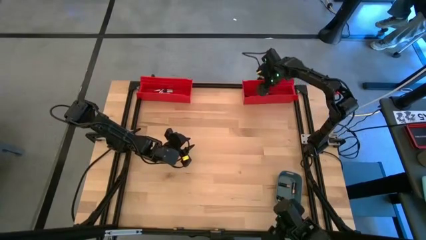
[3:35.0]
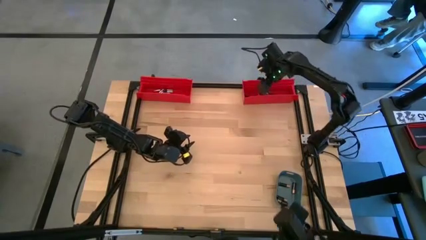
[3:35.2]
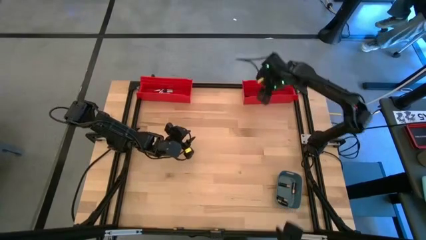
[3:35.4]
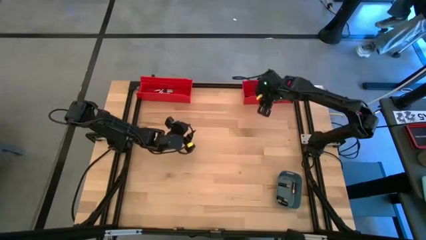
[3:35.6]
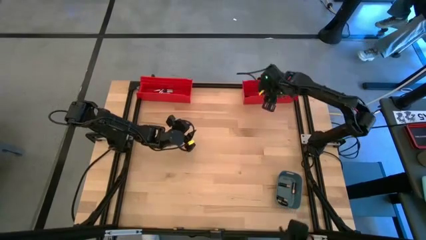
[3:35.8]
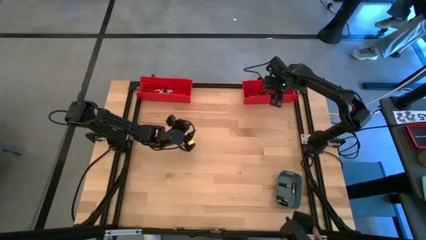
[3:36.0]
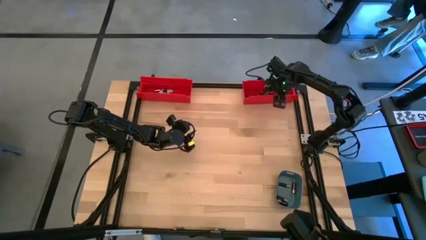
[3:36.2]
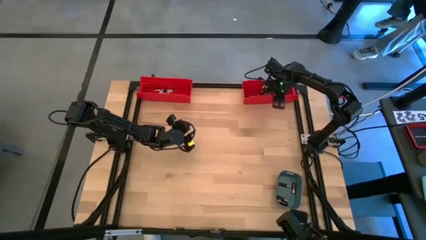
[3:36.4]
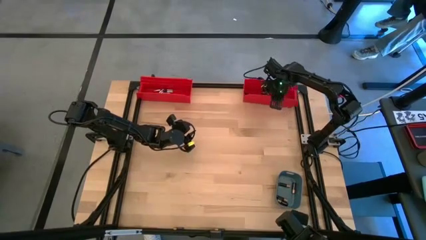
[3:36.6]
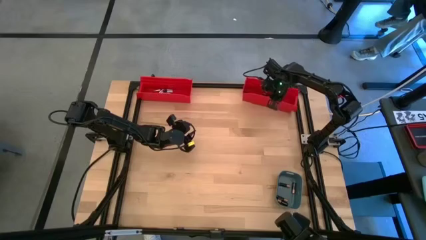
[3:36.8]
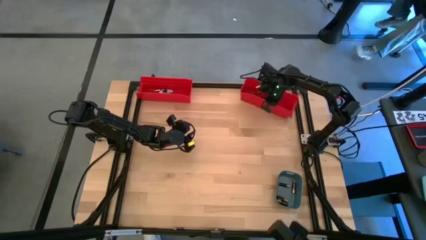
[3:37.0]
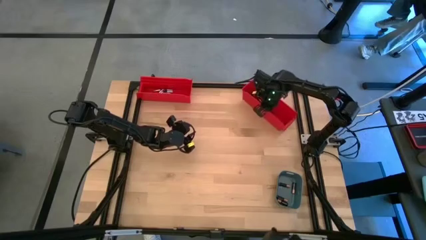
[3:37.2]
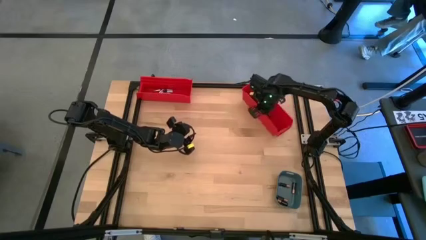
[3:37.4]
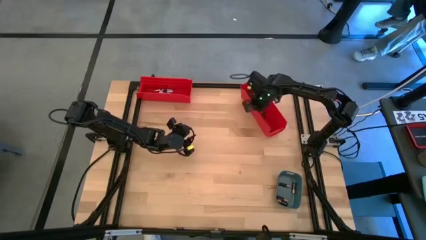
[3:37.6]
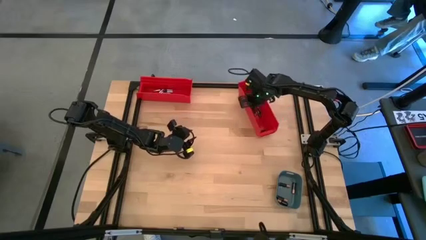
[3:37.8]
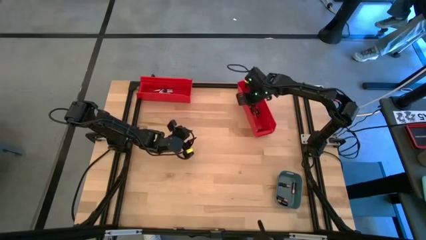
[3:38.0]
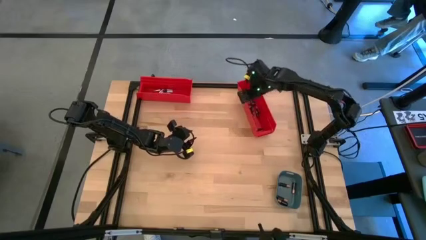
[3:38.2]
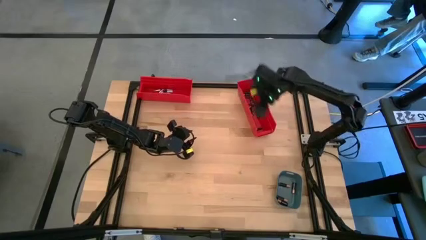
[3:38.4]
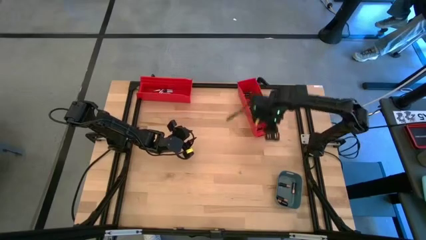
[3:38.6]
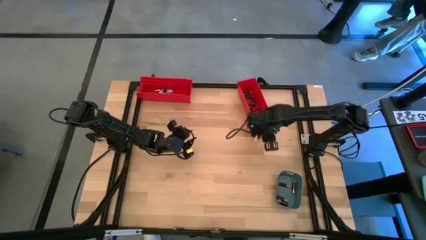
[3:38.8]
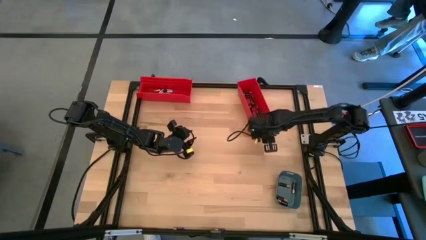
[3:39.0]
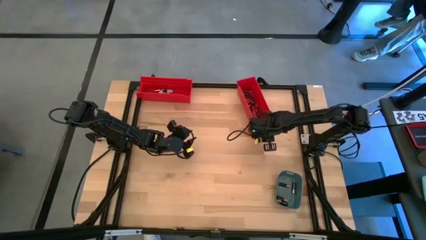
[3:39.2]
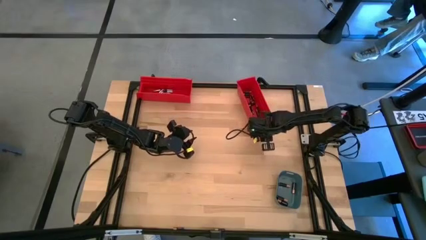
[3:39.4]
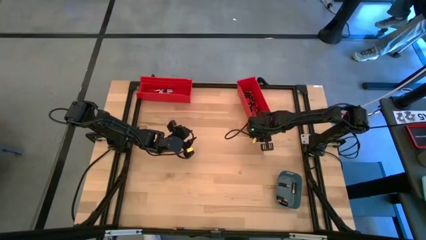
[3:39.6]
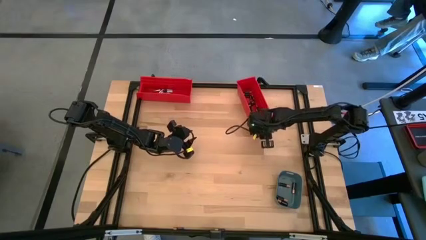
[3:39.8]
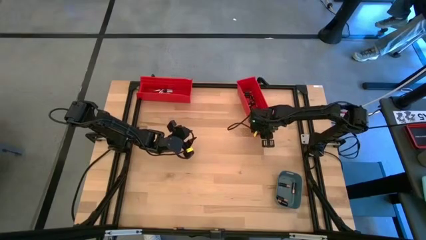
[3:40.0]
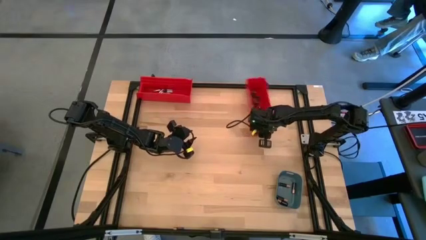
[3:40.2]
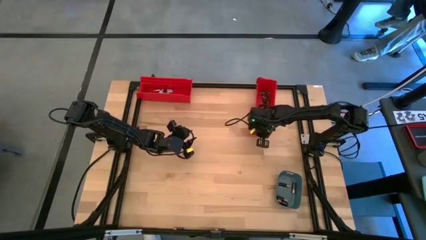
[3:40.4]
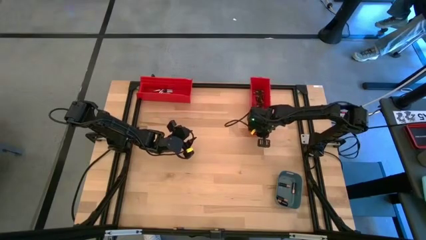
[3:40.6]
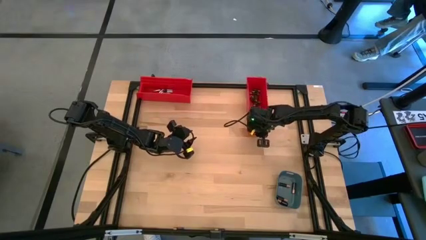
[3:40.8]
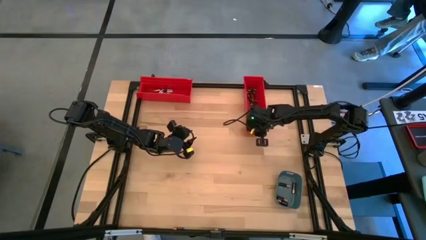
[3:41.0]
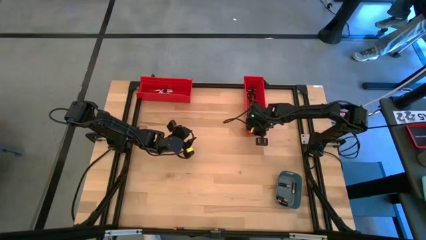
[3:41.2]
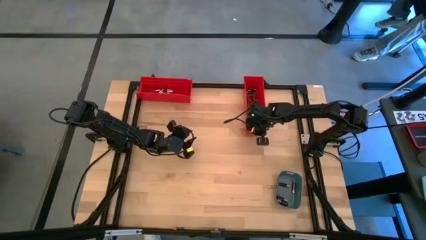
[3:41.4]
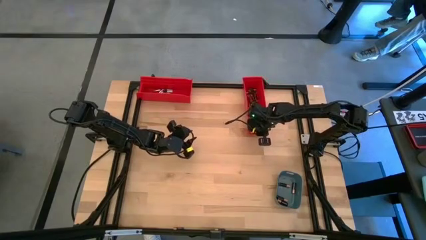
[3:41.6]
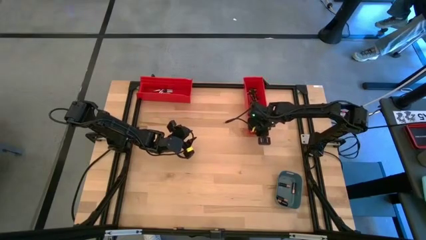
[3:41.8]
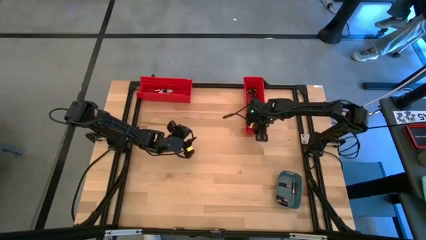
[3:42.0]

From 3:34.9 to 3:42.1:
Task: Sort batteries
Adjust the right red bin

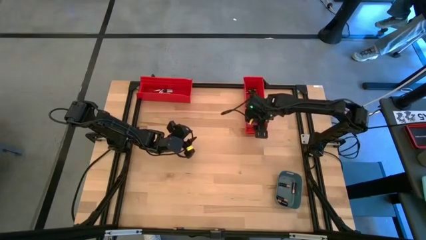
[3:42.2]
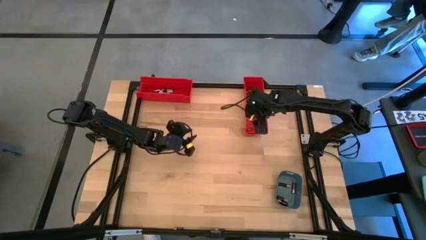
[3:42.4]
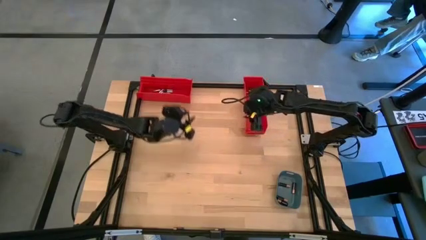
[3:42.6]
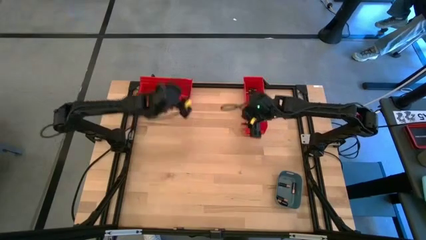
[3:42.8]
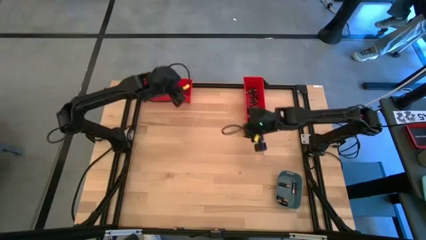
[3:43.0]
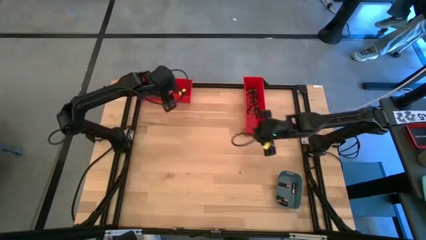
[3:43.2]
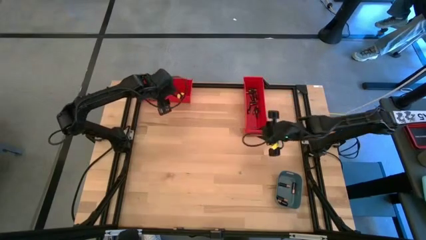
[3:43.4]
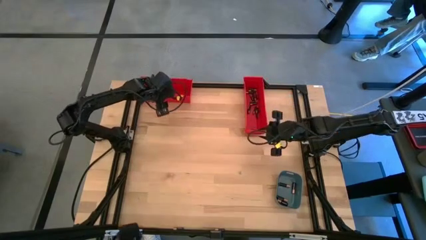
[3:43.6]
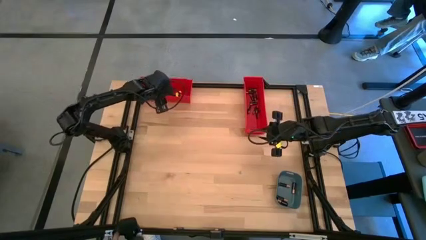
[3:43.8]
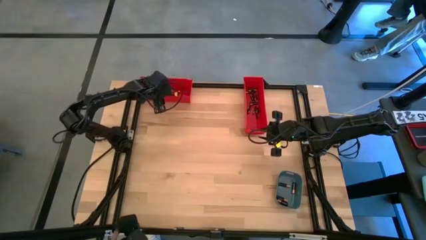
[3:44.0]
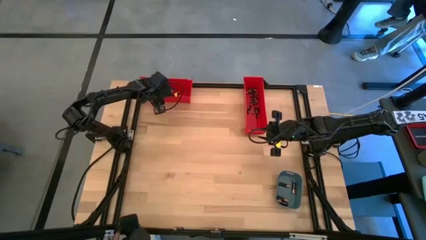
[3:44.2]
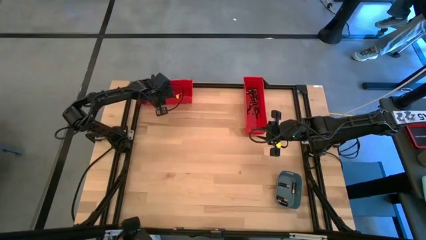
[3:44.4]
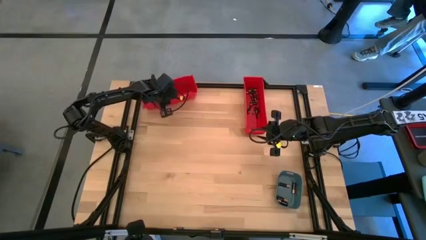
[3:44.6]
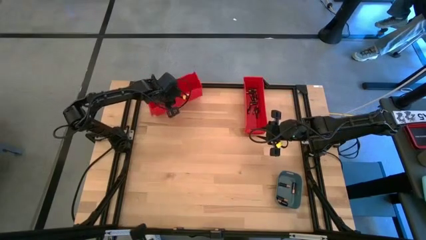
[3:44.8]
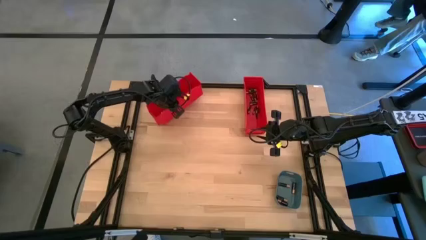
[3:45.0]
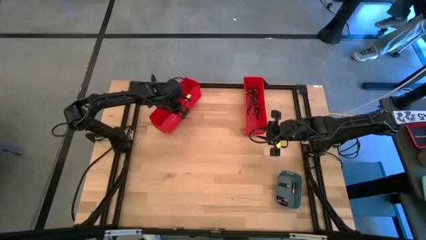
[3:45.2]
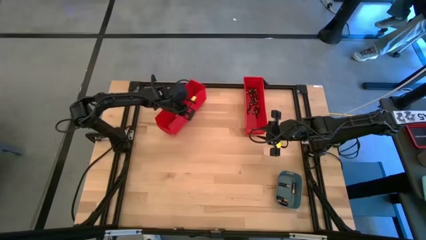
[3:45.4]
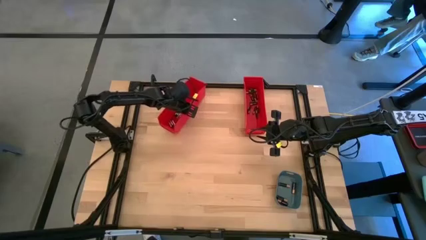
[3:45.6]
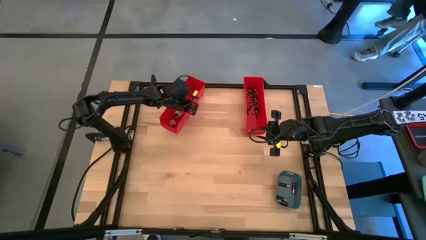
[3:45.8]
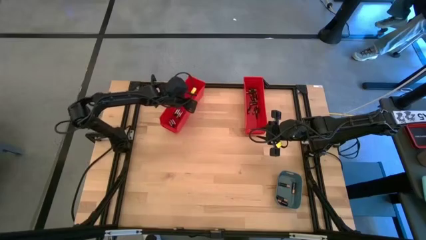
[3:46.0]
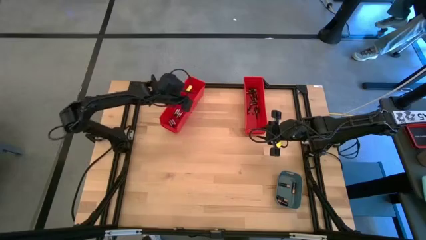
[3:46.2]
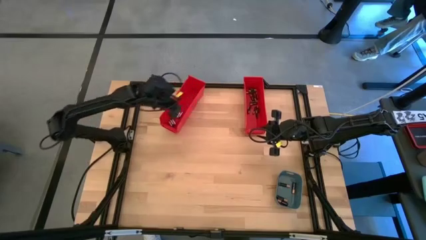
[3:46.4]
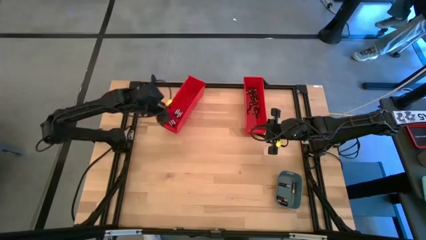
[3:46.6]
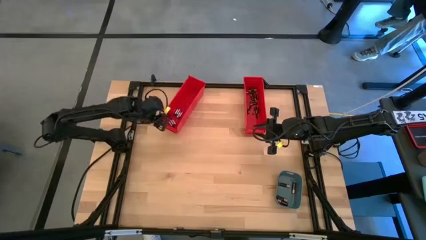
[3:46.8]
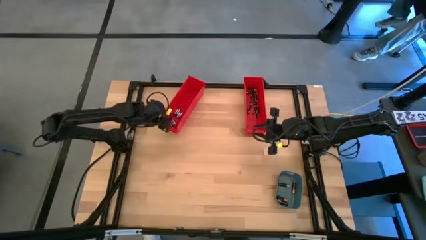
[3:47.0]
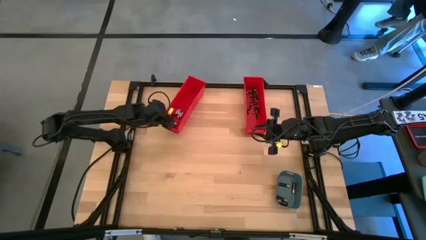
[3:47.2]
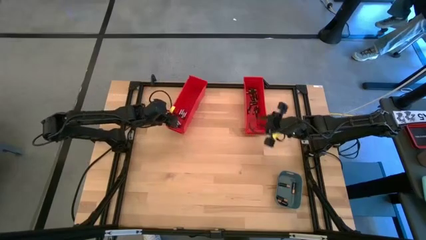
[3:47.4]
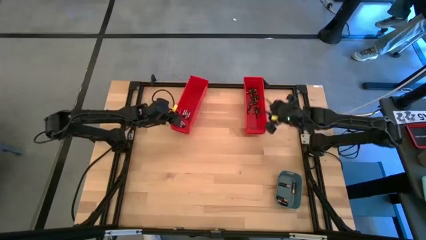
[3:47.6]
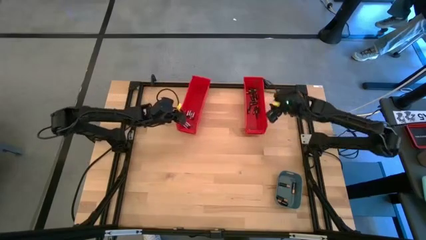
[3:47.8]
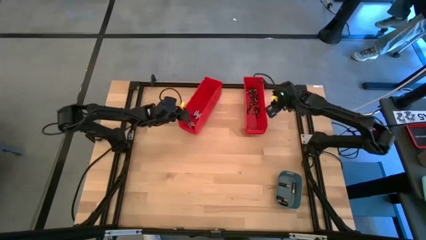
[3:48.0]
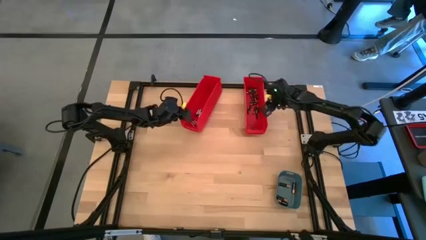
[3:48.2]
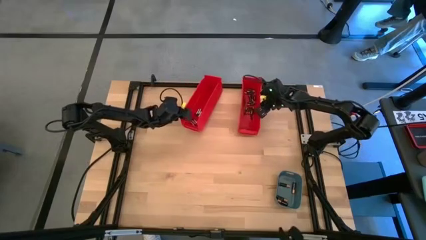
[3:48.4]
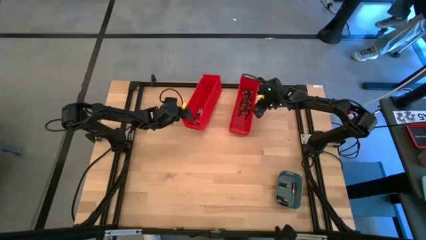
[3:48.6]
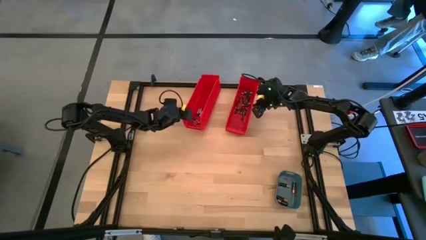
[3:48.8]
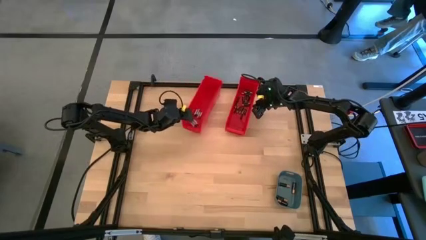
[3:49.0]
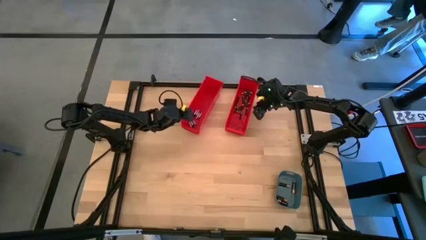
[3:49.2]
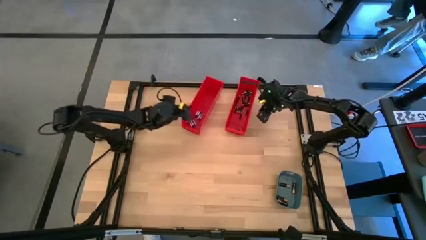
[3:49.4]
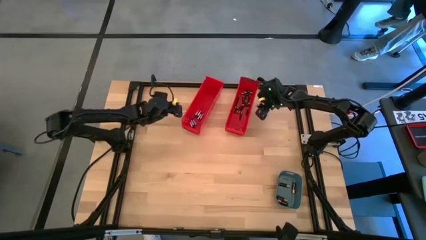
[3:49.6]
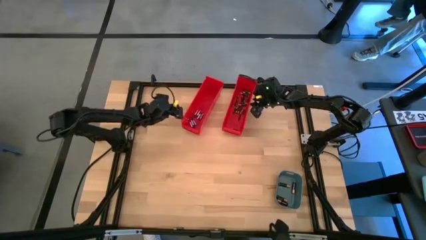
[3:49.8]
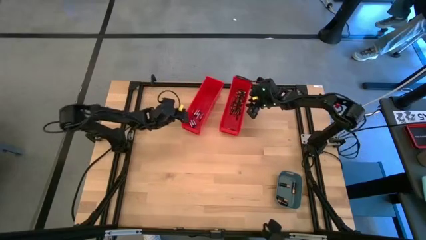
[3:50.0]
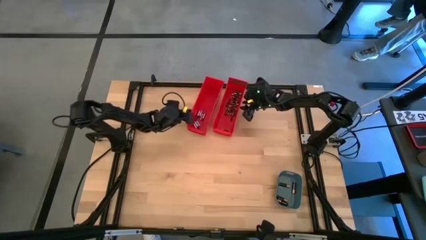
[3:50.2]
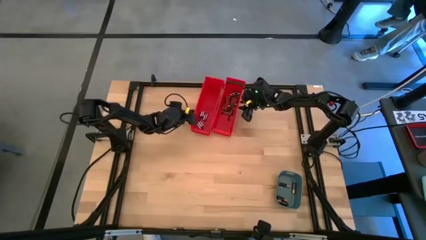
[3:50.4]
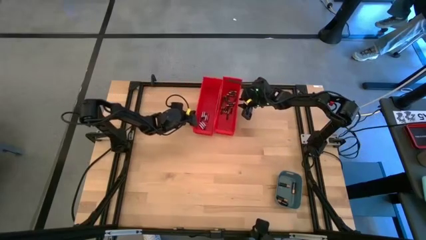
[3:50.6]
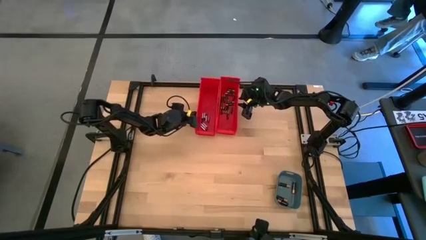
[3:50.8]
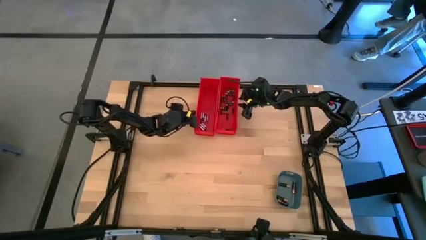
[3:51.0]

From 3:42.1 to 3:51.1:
Adjust the left red bin
